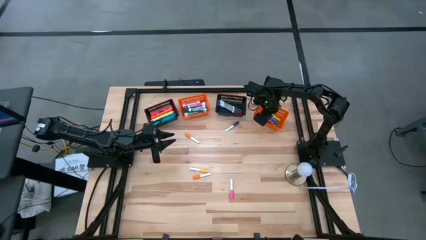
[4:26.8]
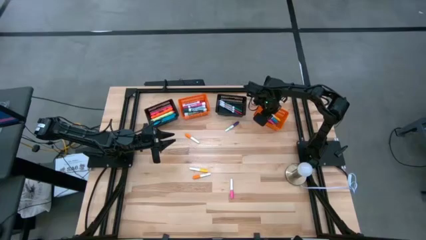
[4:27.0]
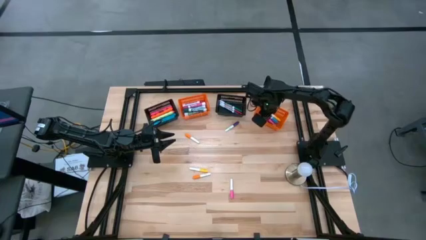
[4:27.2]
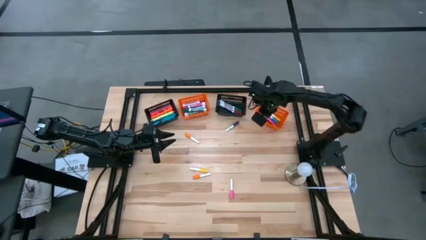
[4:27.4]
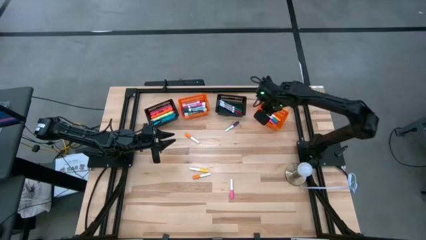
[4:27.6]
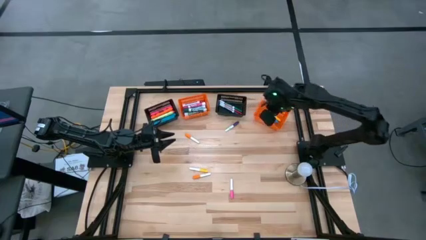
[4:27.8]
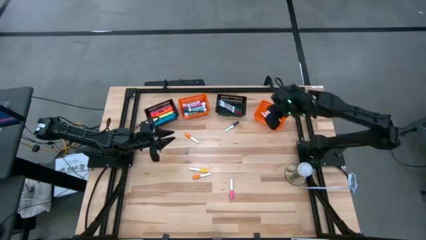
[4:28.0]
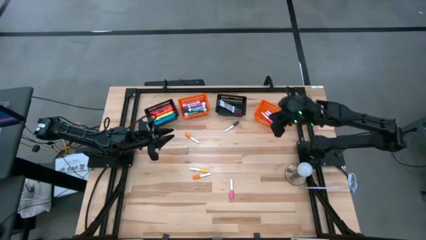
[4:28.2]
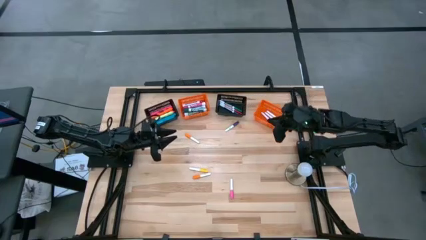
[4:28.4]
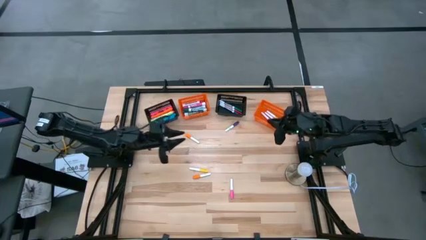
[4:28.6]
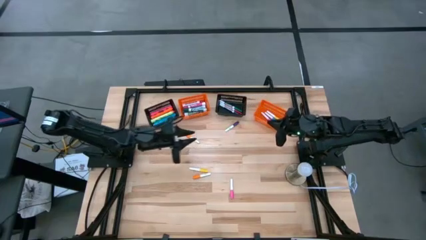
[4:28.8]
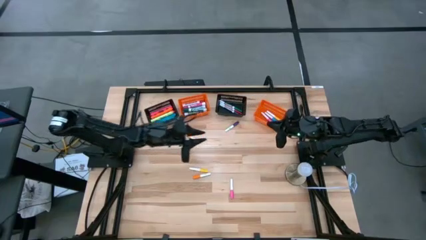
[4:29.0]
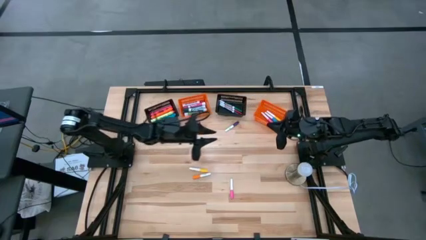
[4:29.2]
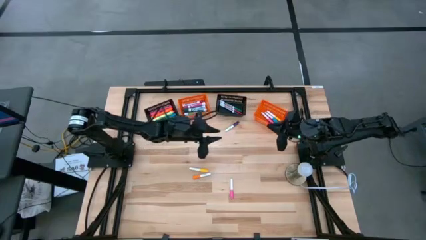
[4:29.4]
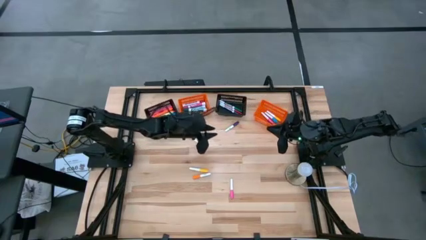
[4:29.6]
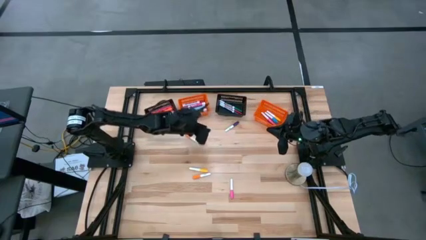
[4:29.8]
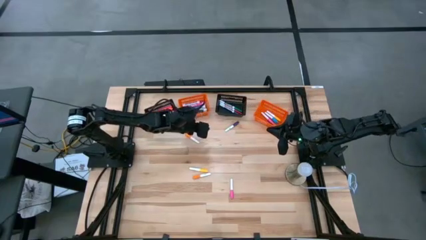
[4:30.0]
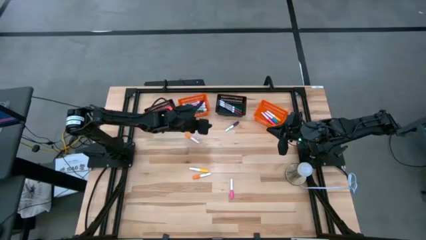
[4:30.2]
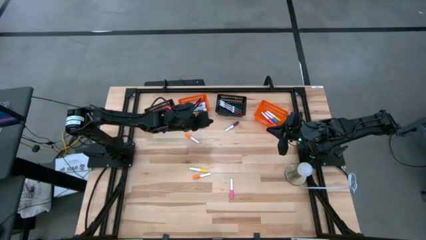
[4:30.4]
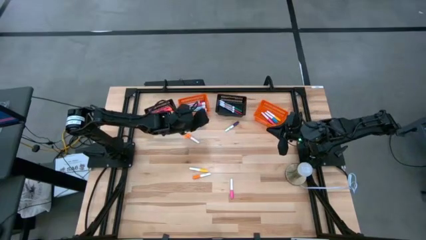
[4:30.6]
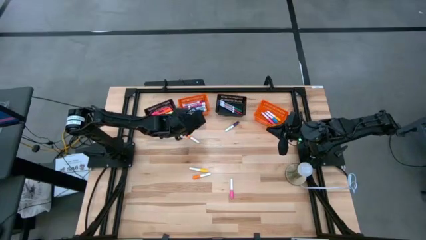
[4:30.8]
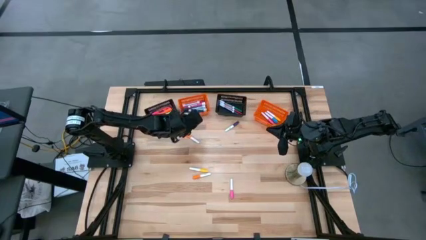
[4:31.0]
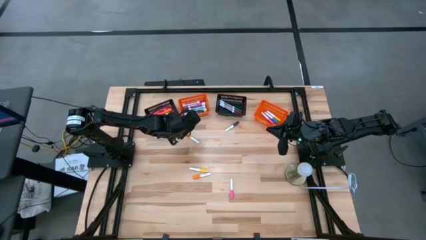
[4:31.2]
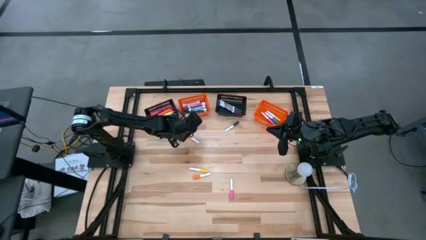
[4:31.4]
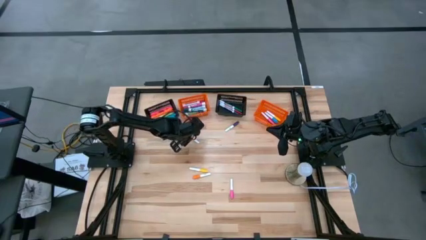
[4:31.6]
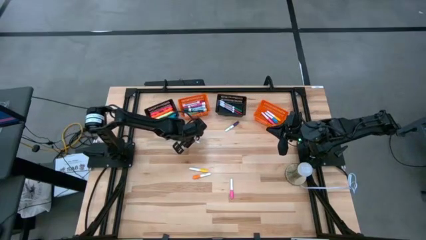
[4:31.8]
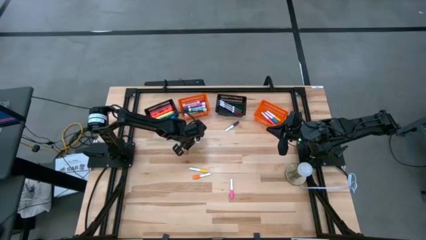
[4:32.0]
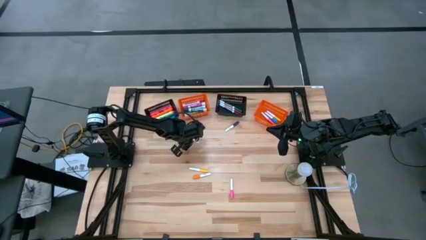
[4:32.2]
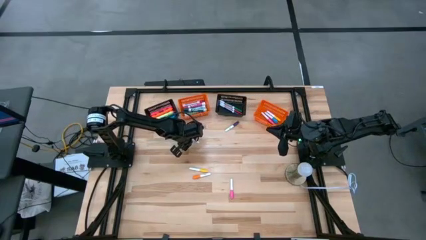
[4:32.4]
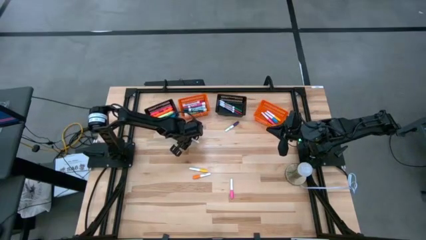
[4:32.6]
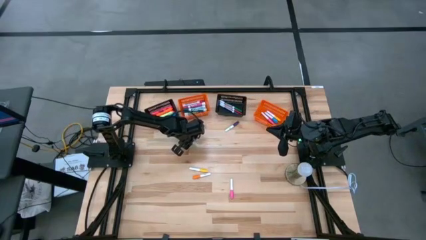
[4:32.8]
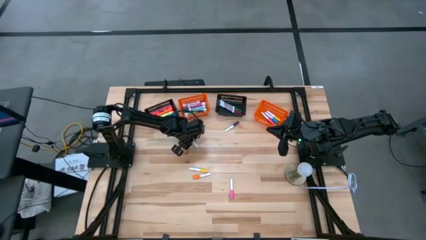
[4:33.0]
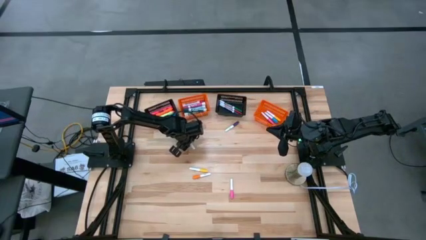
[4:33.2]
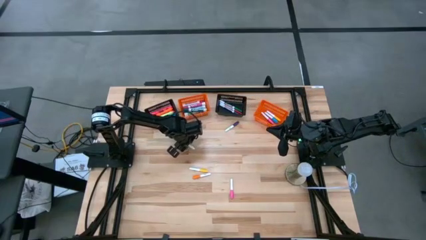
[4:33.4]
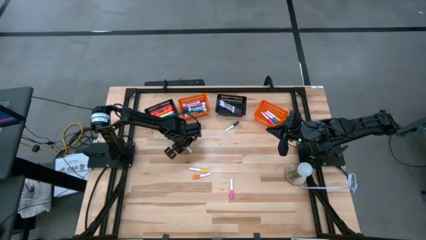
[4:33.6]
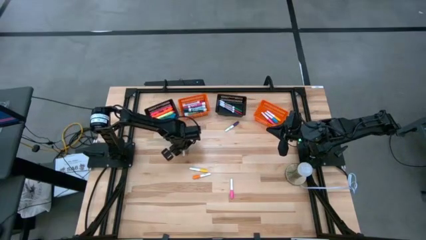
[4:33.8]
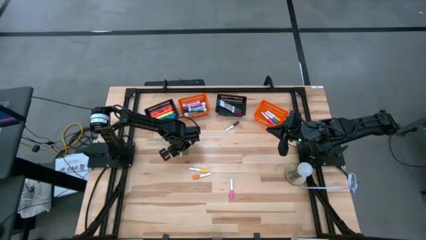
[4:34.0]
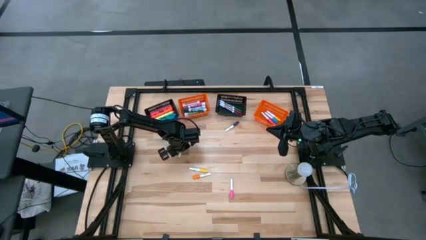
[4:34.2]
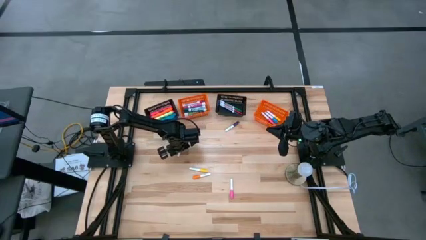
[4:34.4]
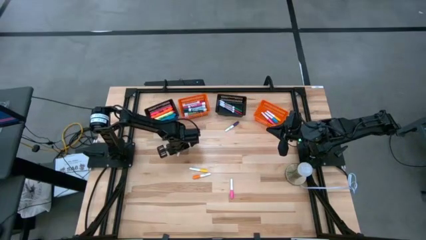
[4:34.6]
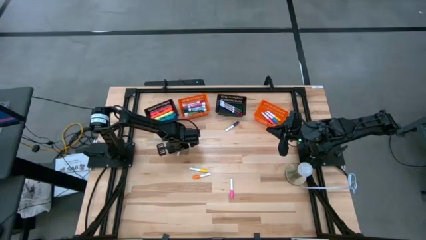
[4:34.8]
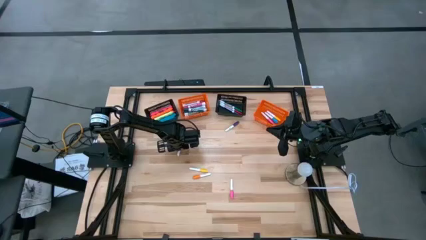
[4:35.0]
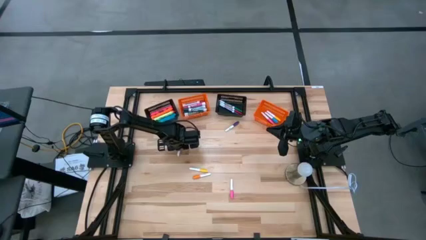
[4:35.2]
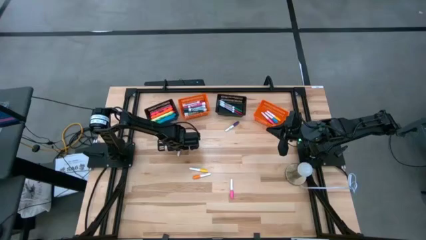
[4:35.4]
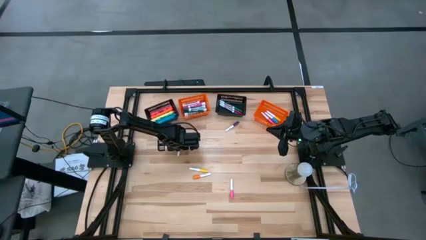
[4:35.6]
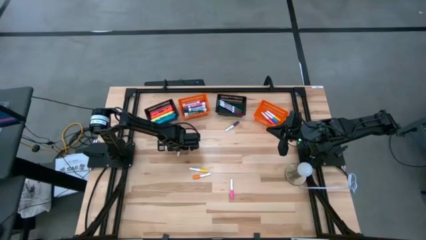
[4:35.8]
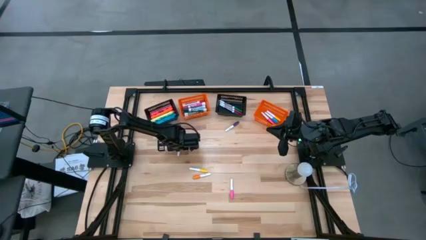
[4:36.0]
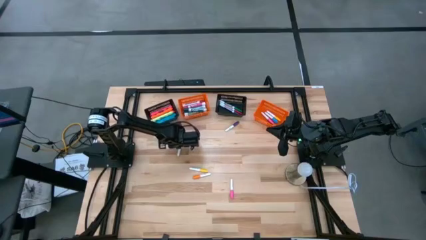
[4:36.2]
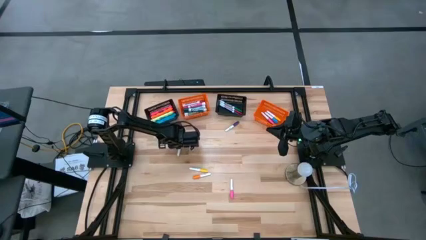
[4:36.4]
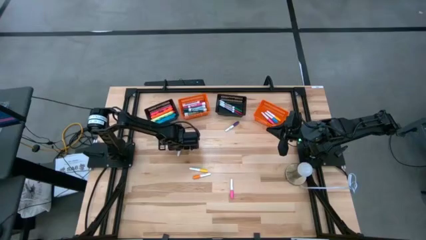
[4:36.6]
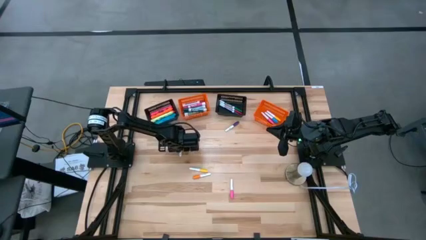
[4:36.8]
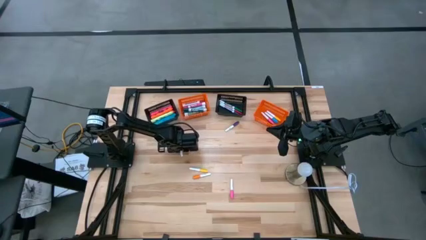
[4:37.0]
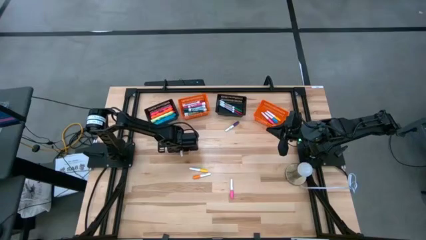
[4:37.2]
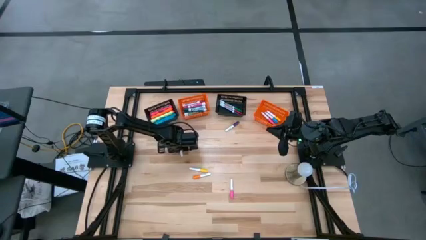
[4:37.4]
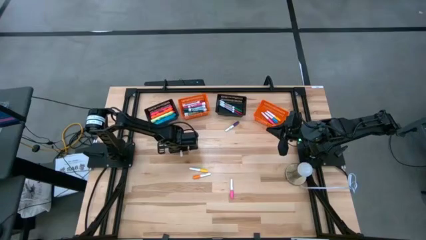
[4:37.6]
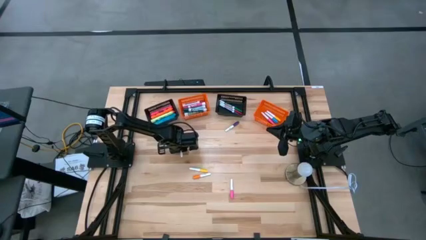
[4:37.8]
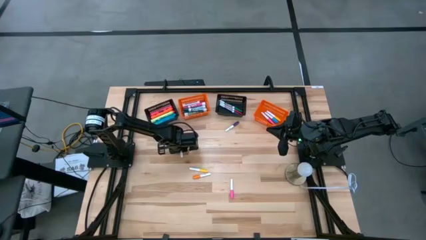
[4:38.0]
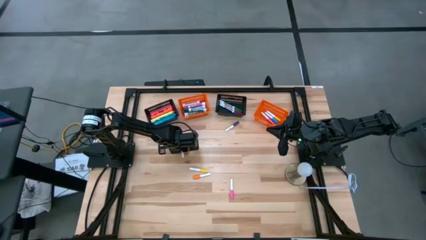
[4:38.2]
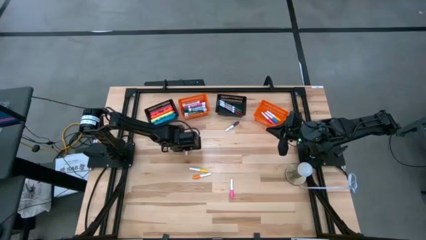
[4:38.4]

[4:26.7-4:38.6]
Task: Pick & Place Markers
Put the top orange small highlighter pen into the left orange bin

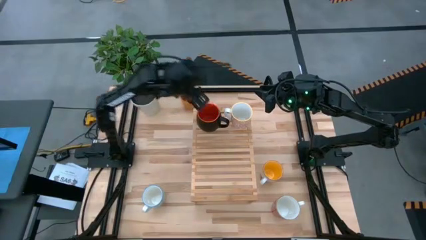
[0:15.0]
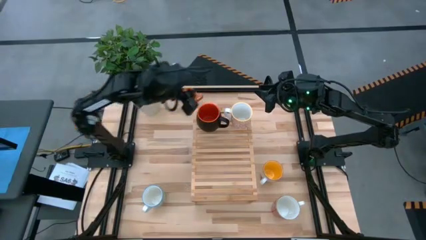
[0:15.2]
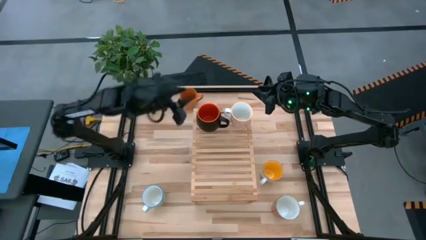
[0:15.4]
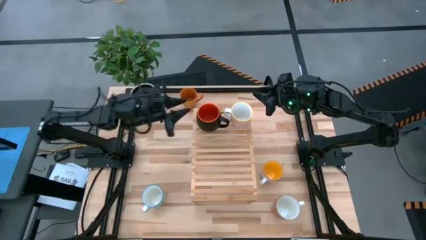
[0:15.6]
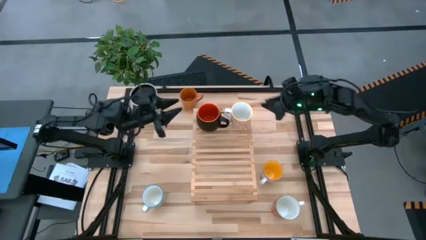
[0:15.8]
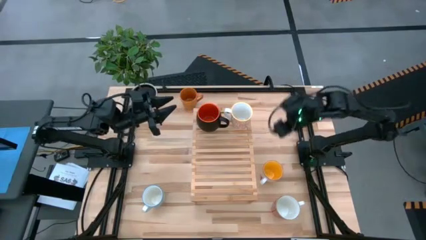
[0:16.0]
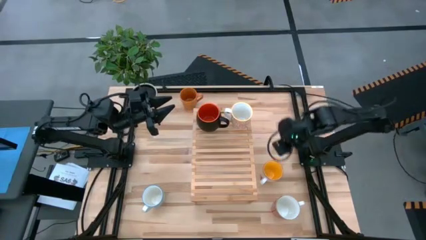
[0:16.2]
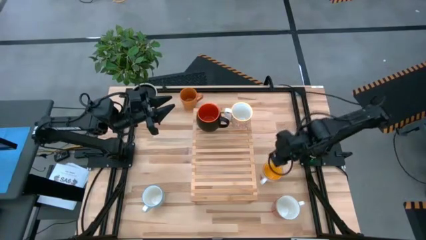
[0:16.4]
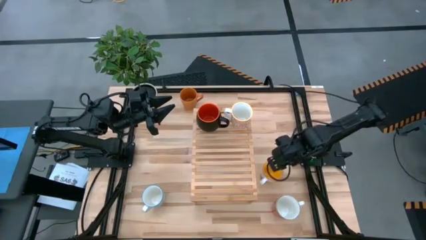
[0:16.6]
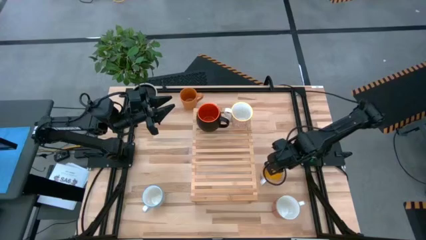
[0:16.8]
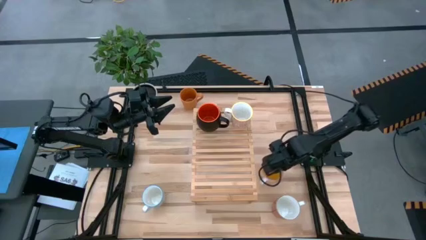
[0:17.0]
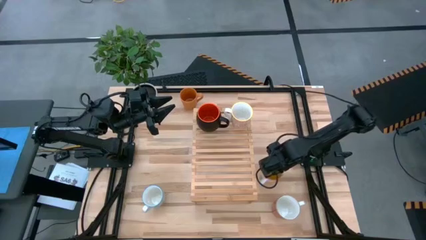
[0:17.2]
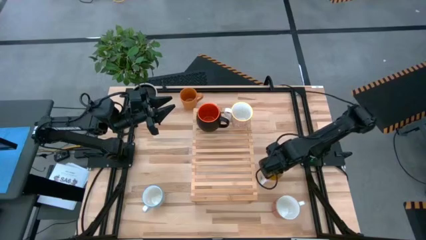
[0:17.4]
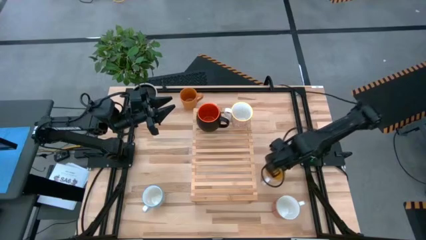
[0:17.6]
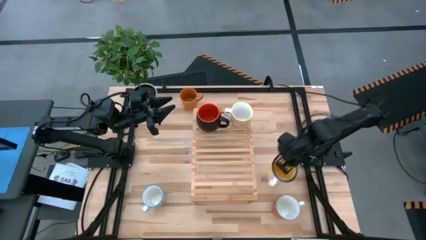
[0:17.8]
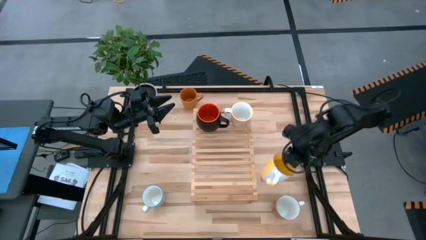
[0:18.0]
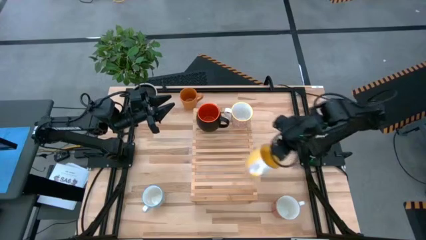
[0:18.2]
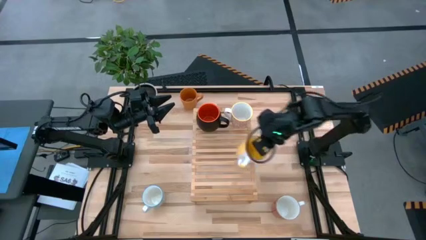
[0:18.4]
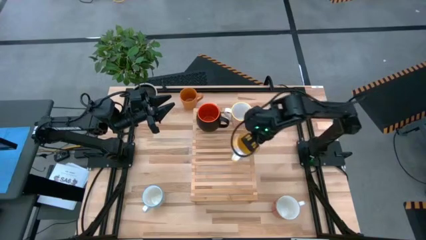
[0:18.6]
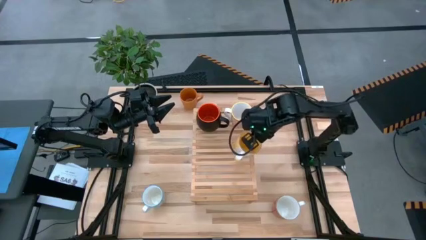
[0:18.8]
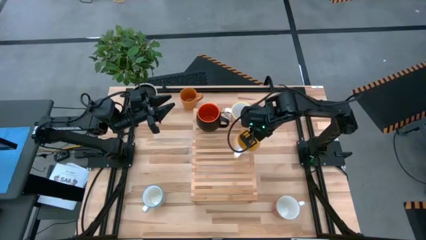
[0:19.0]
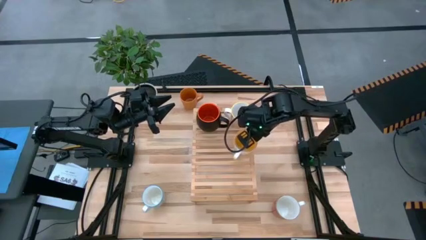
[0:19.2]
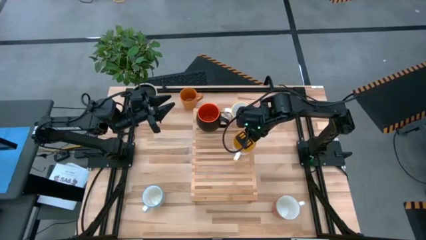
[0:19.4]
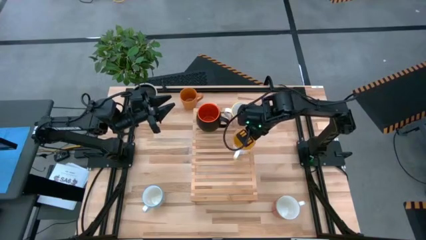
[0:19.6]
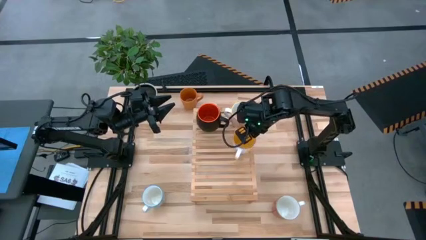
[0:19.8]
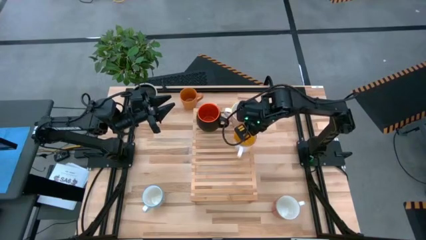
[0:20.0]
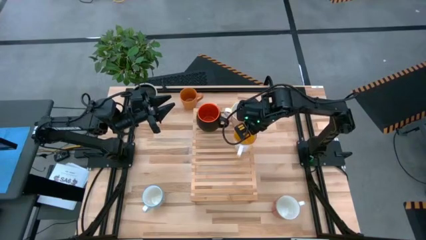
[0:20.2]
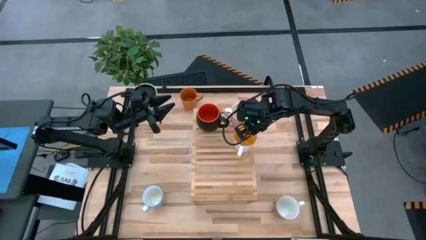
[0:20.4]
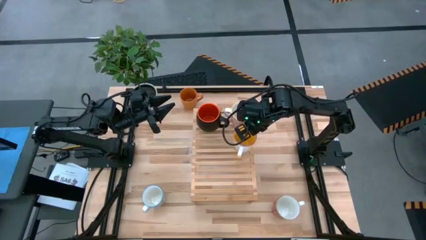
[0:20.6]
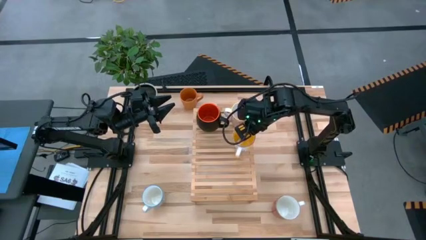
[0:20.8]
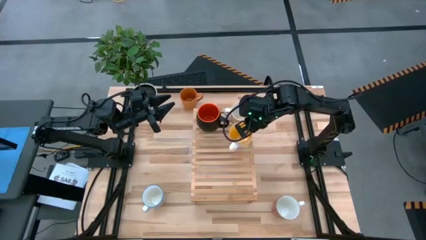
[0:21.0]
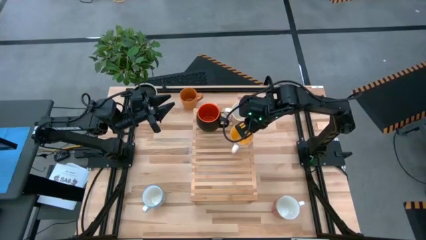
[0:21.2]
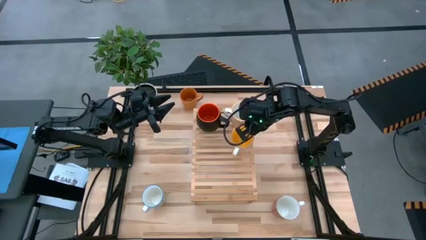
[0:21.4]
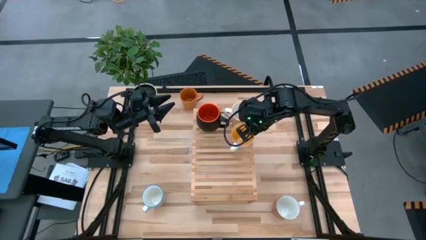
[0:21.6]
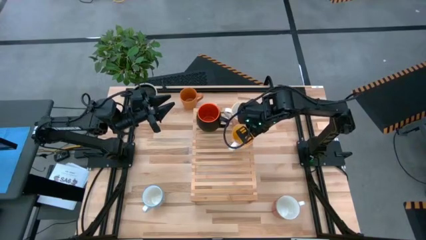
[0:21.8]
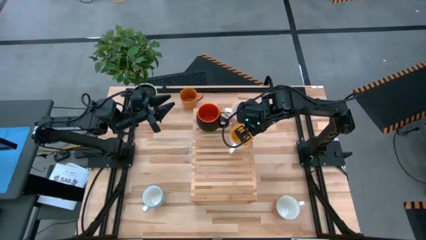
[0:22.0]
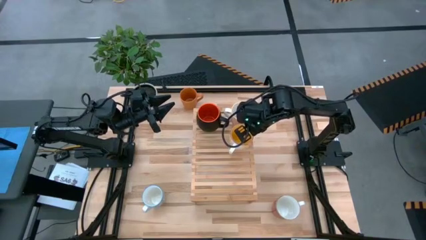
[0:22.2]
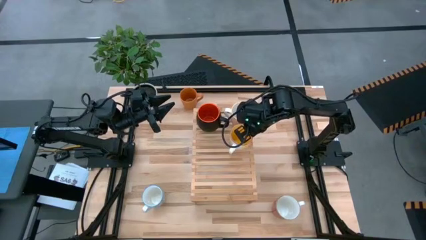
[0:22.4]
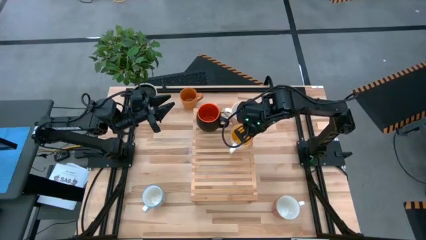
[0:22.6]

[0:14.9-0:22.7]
Task: Place coffee mugs
Put the yellow mug on the shelf
